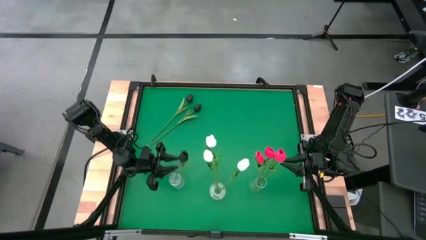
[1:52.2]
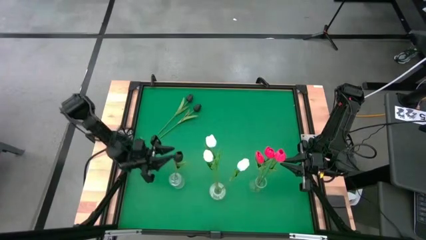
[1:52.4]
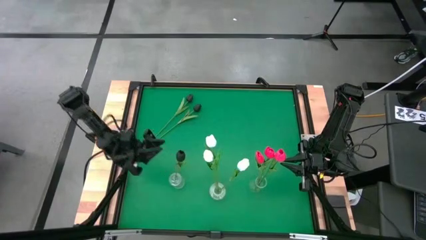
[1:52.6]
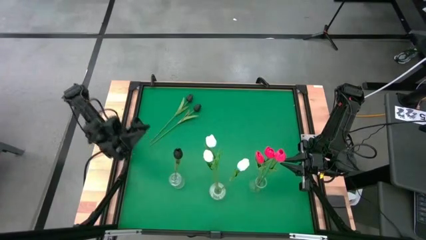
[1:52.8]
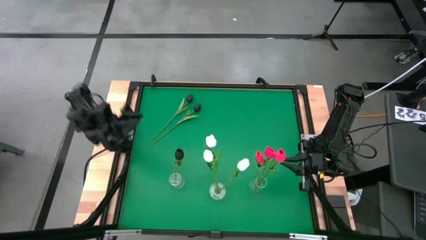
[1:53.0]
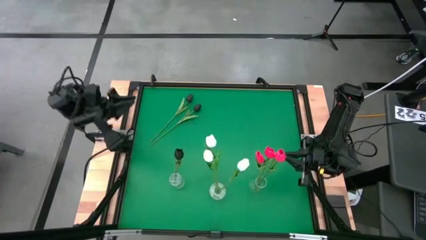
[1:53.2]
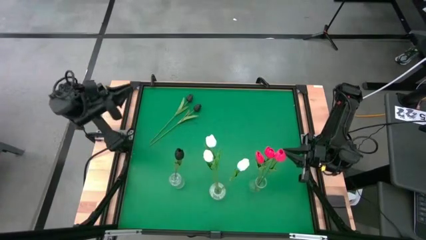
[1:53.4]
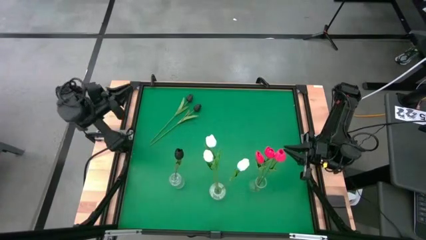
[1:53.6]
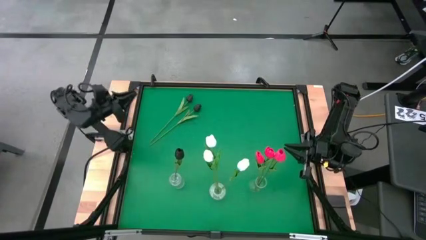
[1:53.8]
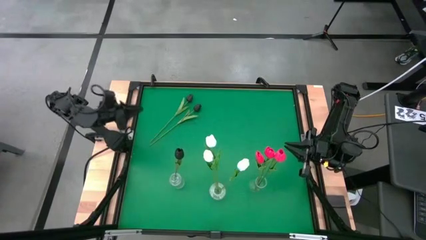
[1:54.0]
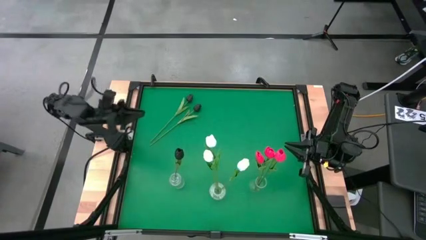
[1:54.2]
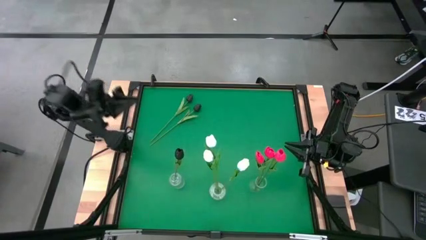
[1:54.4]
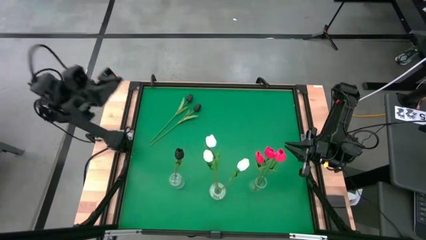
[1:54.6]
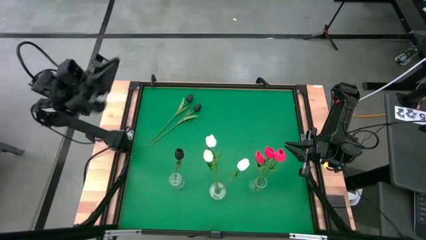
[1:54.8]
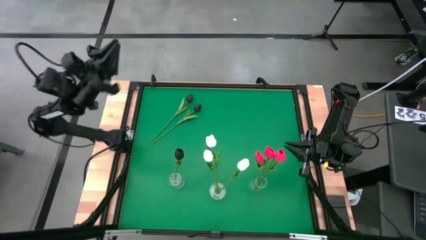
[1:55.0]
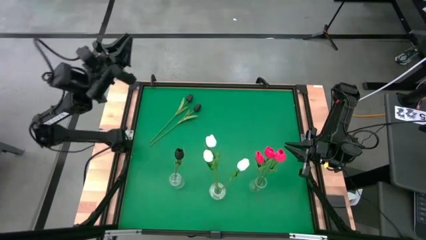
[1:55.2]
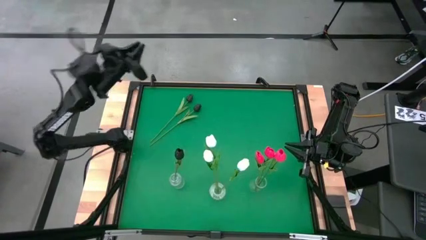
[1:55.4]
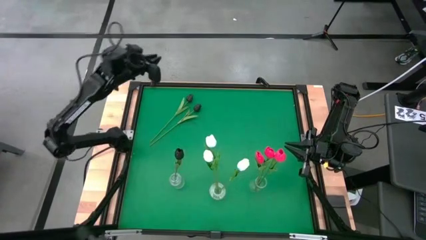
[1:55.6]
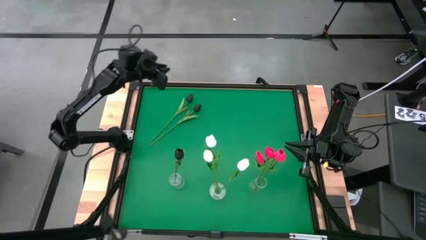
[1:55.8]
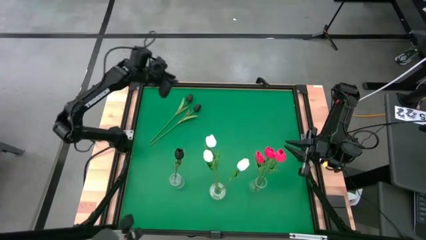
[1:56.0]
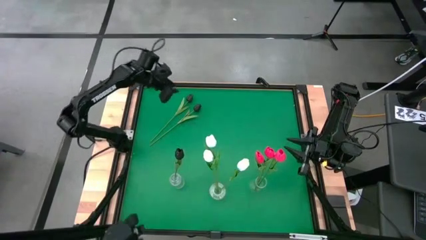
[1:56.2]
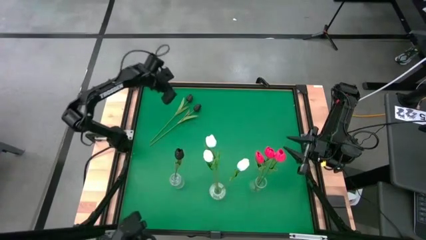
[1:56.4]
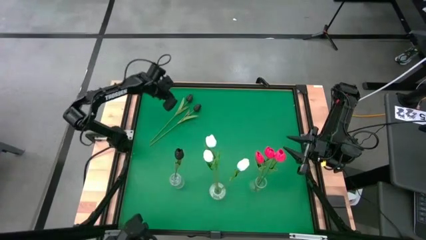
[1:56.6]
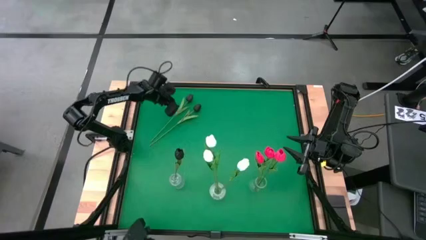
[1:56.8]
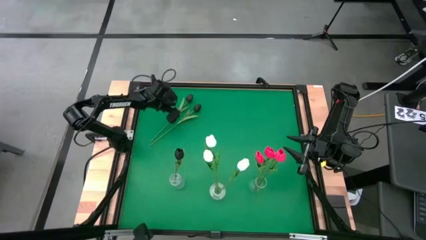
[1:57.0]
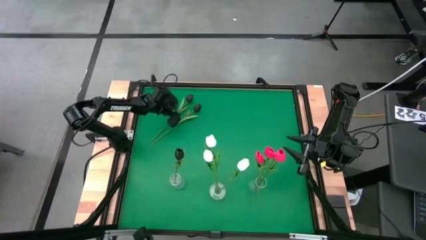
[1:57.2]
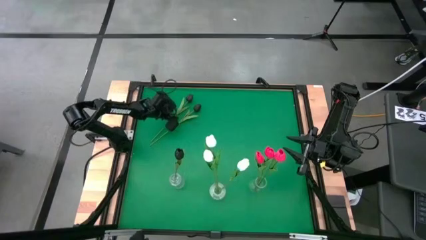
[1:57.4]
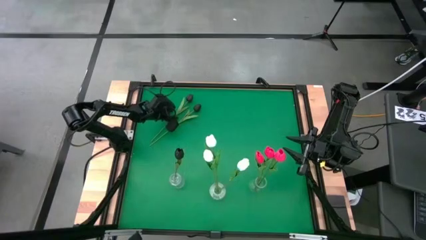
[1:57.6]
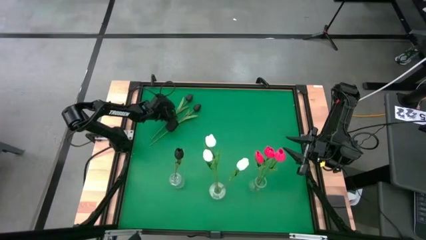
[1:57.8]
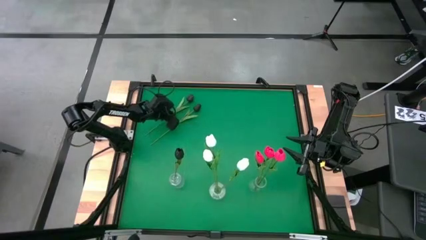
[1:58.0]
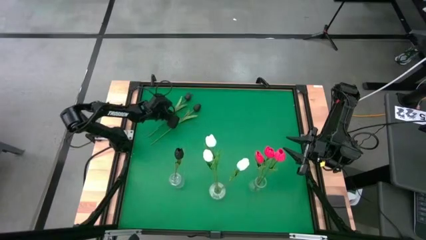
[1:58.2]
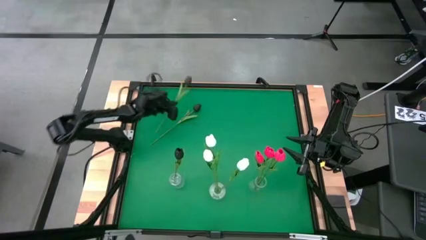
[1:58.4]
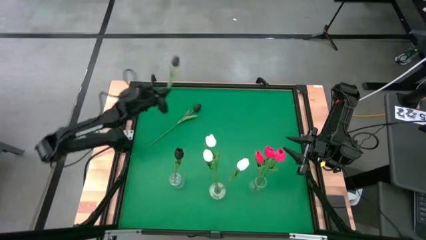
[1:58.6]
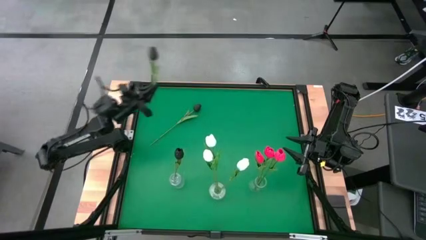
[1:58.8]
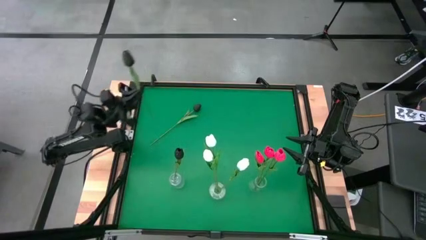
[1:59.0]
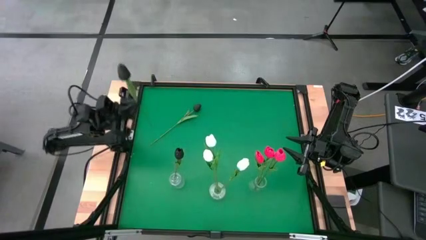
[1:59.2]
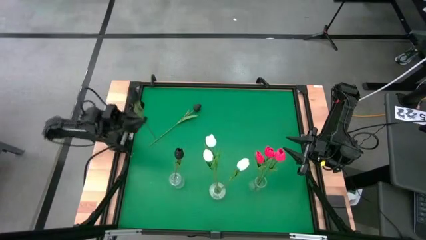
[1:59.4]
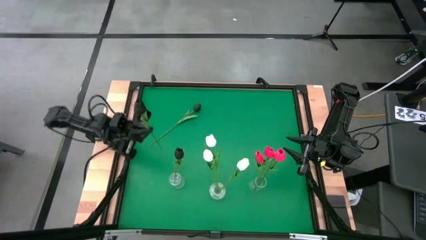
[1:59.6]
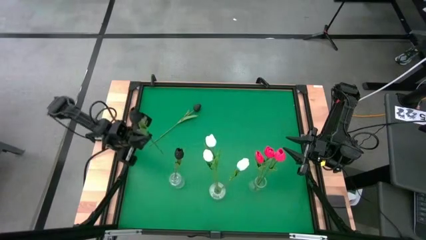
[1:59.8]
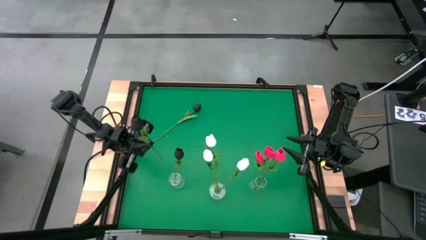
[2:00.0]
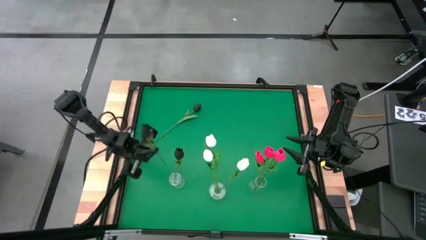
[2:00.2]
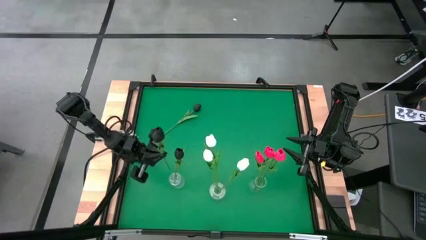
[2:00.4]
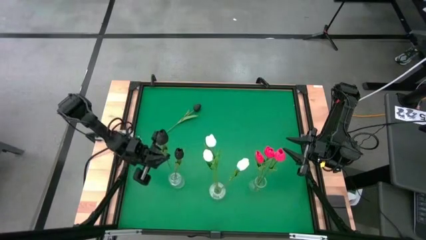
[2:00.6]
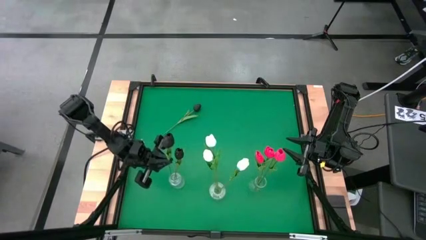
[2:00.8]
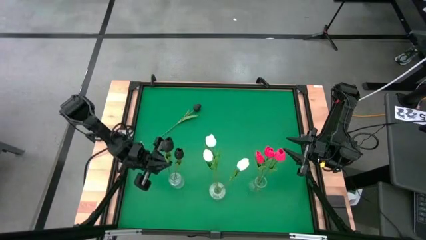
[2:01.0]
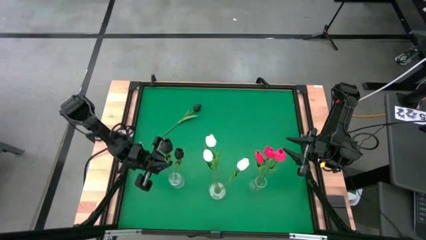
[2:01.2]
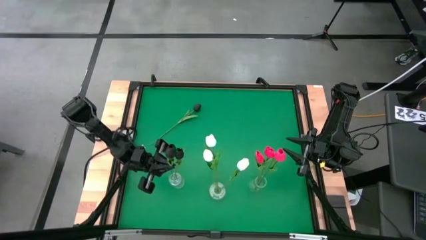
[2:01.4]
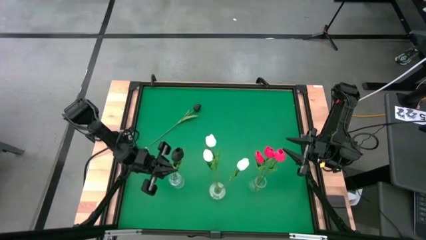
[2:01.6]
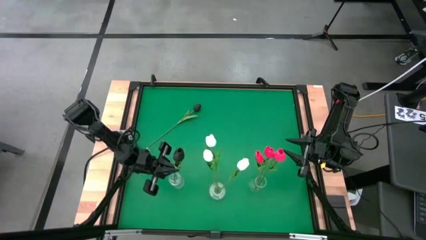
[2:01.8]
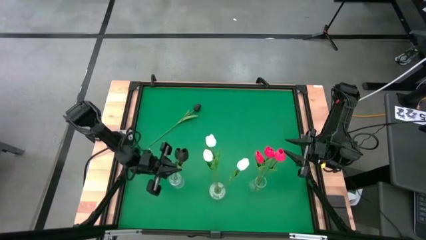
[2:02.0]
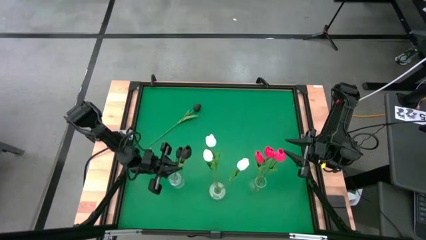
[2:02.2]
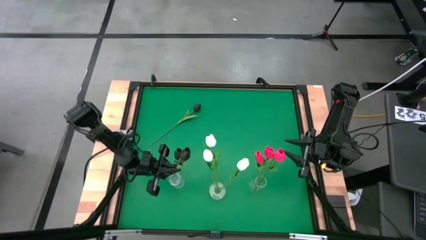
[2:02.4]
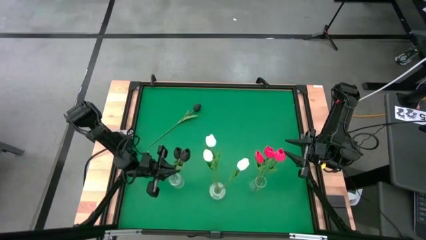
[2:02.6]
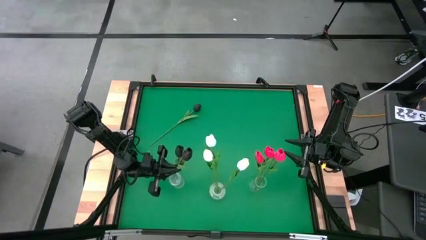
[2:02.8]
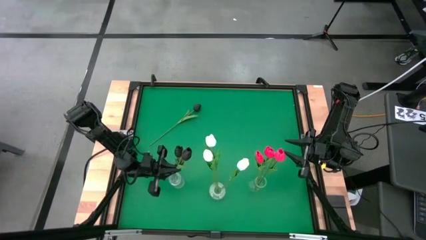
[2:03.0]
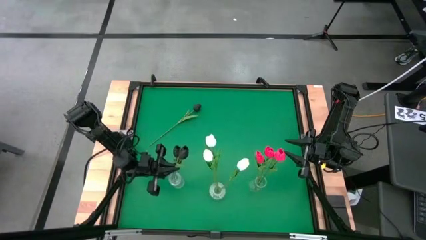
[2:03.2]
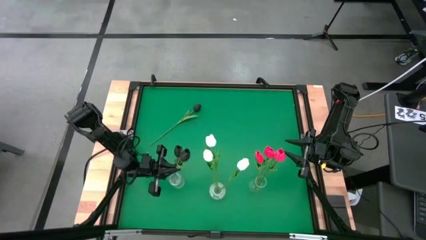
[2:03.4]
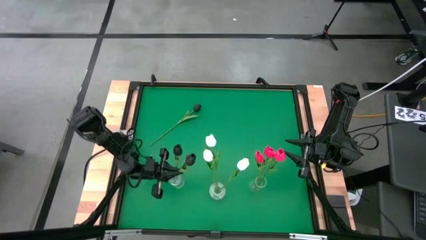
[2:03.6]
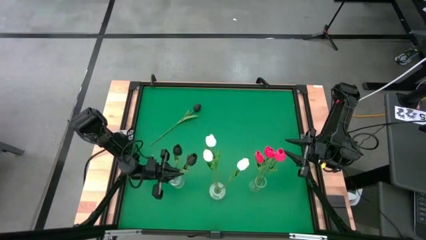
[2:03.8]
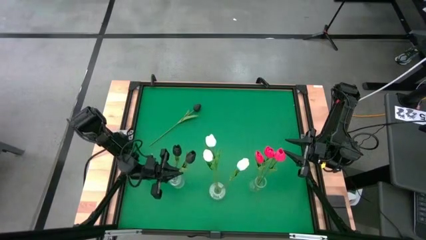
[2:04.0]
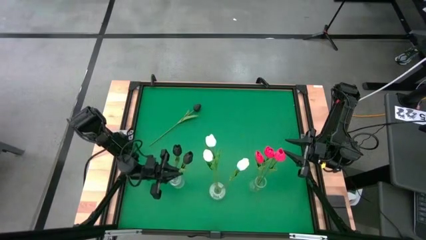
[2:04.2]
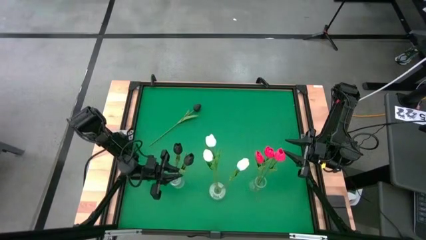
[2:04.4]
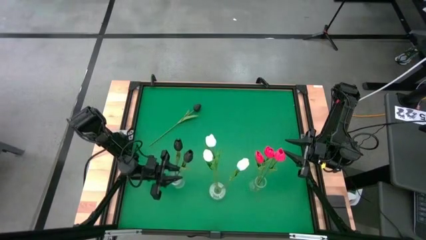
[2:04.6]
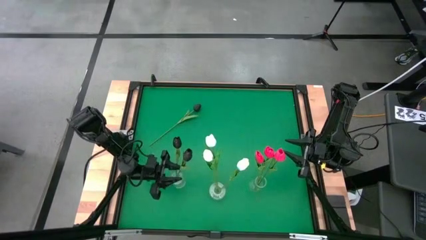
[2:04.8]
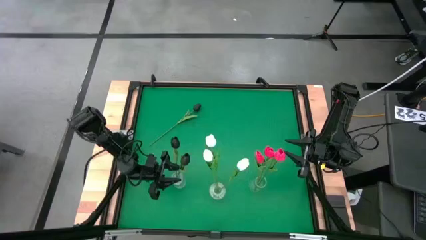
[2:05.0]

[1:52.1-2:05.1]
Task: Sort flowers into vase by color
Put the left black tulip into the left transparent vase

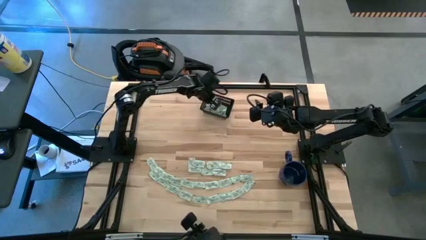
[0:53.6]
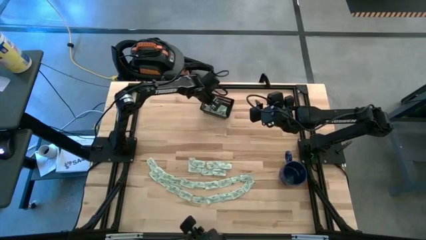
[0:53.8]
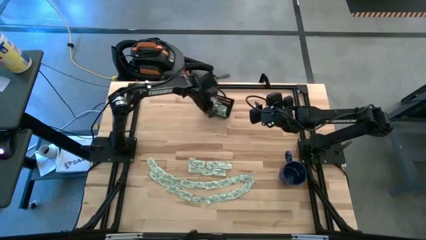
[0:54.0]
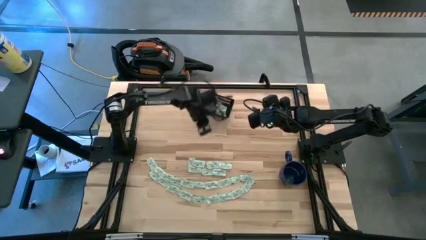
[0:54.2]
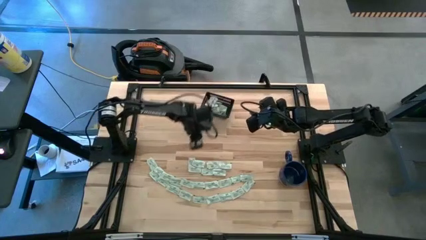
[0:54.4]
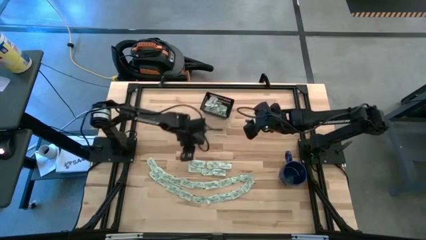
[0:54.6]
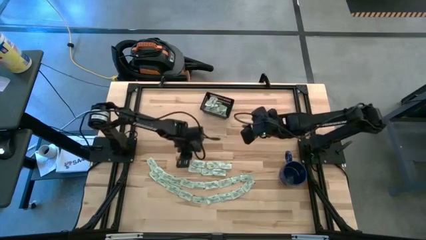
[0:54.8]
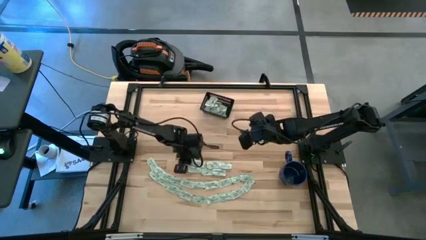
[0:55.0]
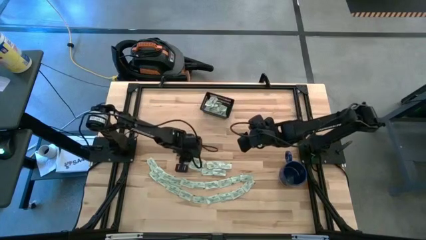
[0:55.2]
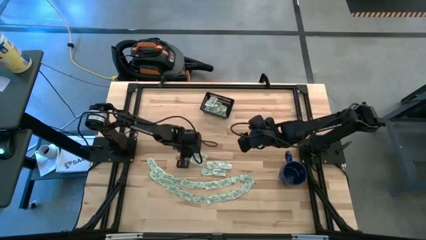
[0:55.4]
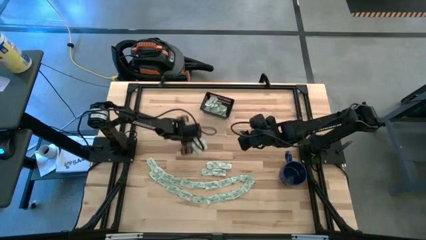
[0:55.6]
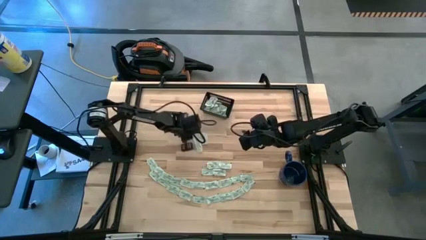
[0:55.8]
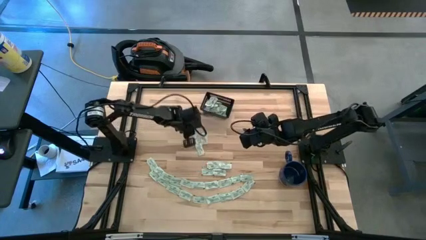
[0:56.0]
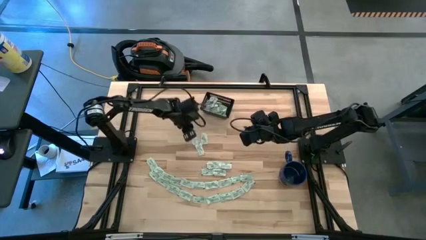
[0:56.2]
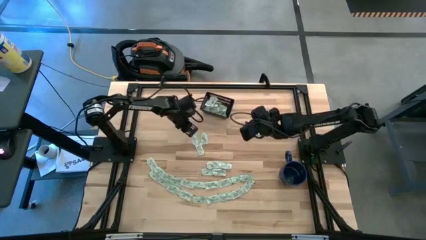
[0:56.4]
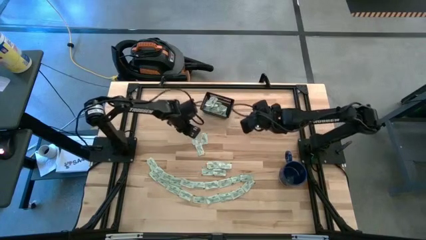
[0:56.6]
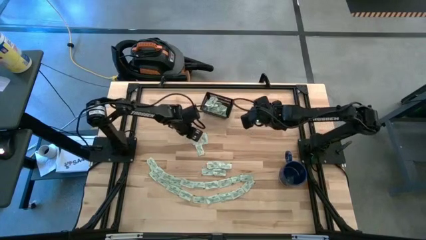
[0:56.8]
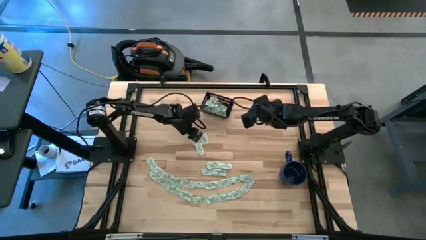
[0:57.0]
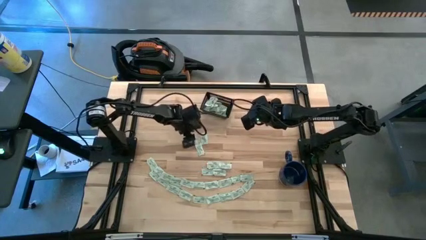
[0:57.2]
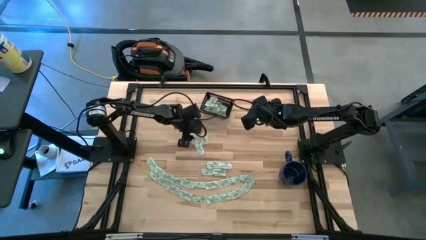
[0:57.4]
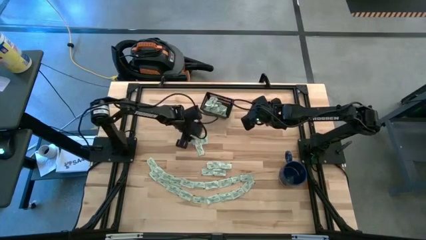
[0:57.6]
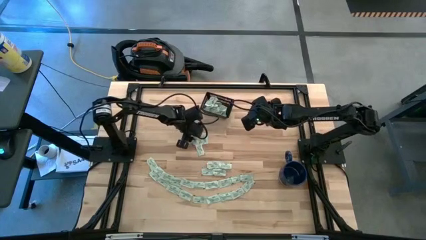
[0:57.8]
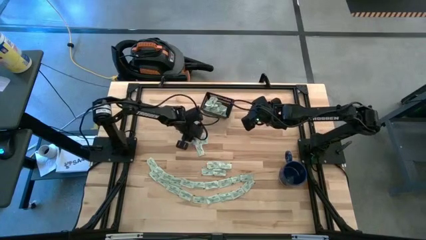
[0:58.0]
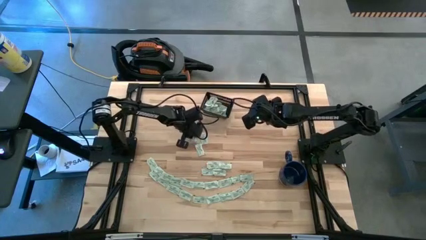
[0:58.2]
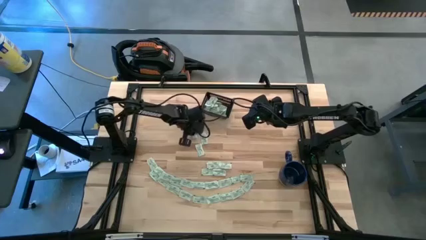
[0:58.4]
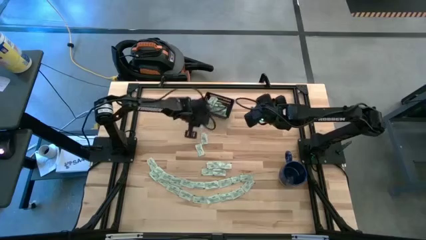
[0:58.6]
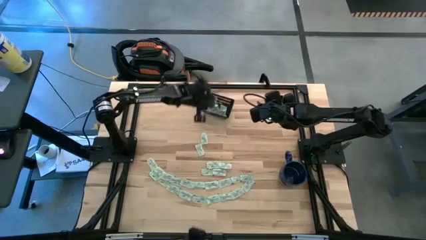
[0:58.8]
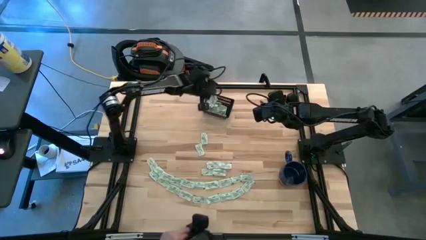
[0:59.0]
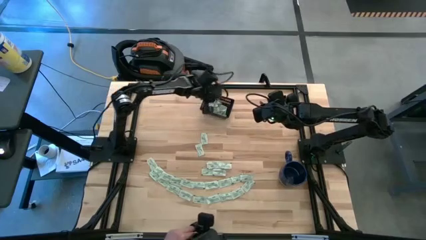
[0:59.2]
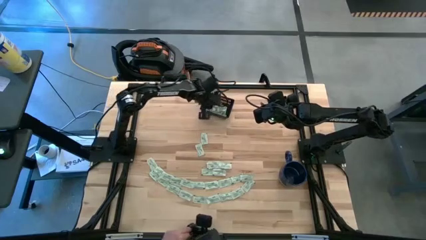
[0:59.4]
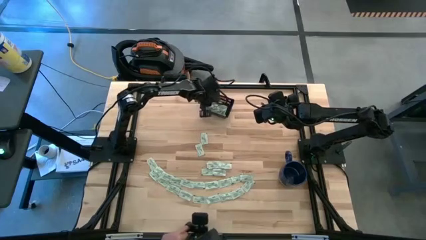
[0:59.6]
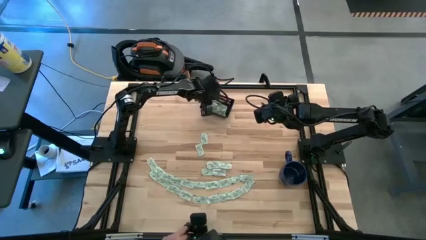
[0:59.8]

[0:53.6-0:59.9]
Task: Pick and place Stevia / Truvia into bins
Put the stevia packet into the black bin
